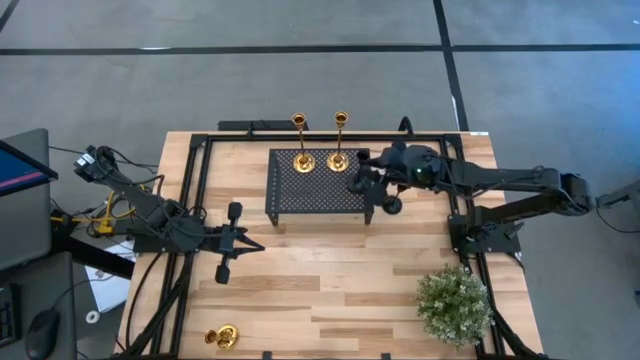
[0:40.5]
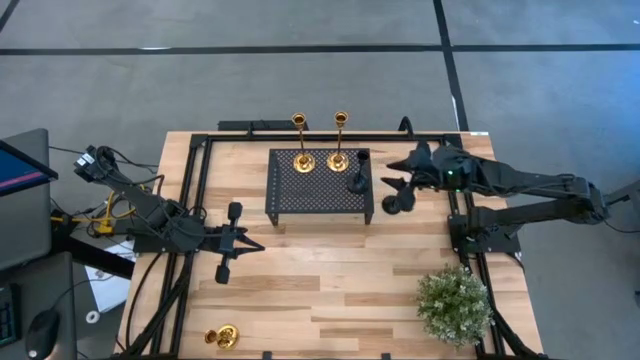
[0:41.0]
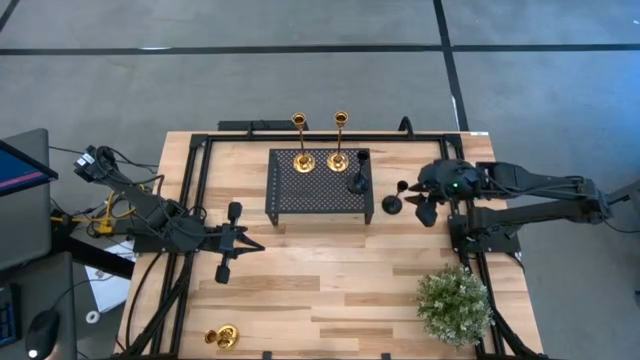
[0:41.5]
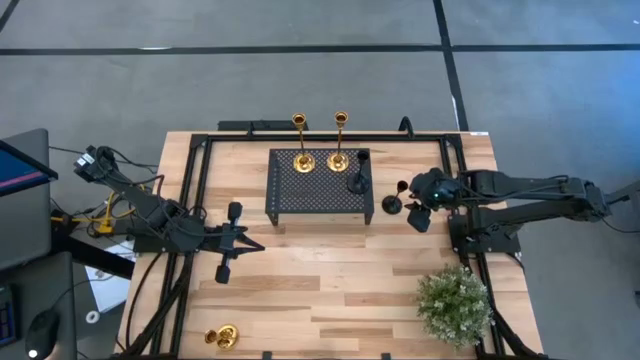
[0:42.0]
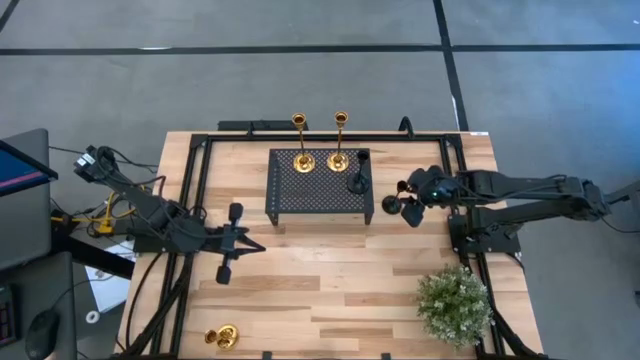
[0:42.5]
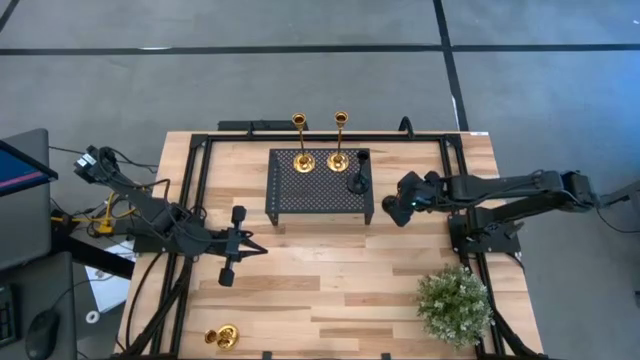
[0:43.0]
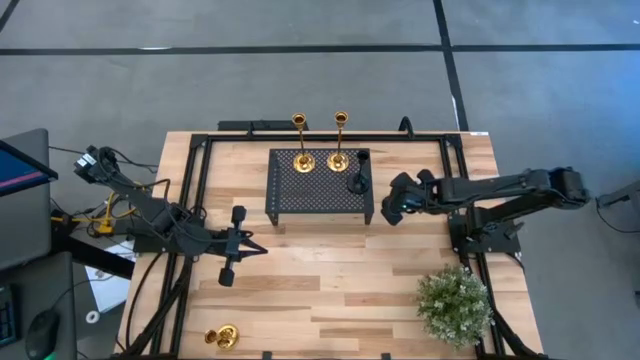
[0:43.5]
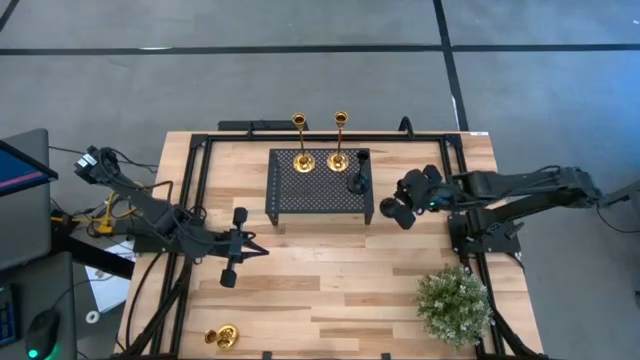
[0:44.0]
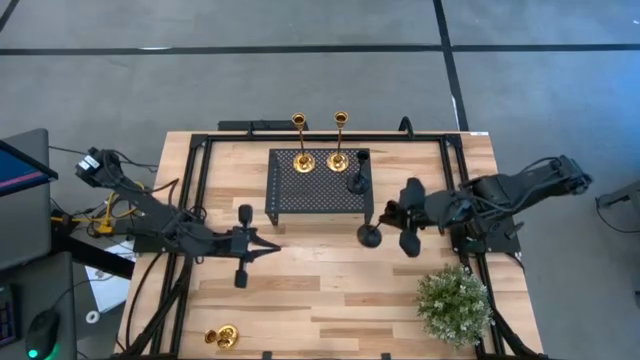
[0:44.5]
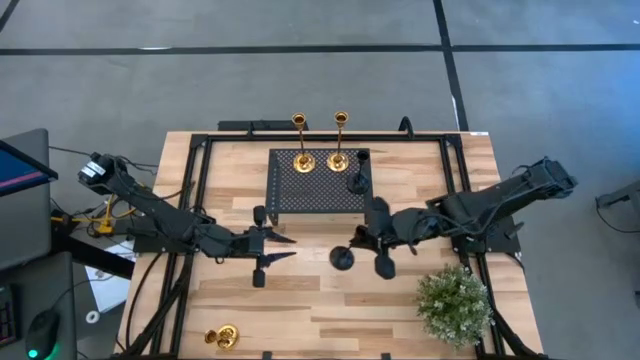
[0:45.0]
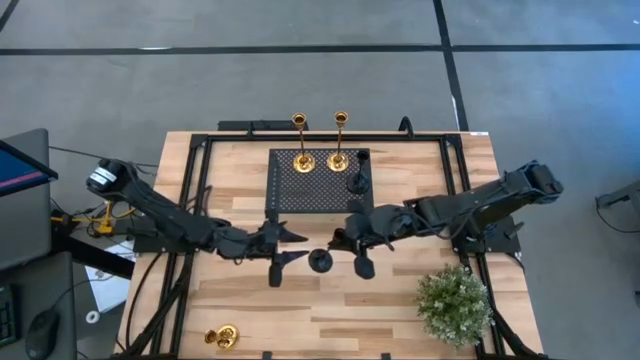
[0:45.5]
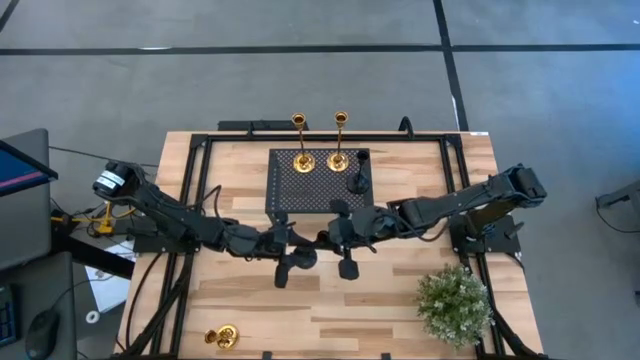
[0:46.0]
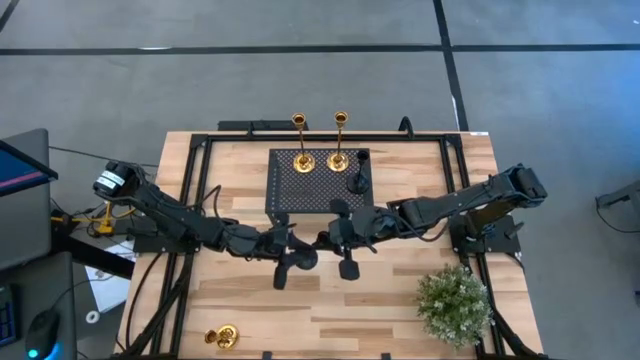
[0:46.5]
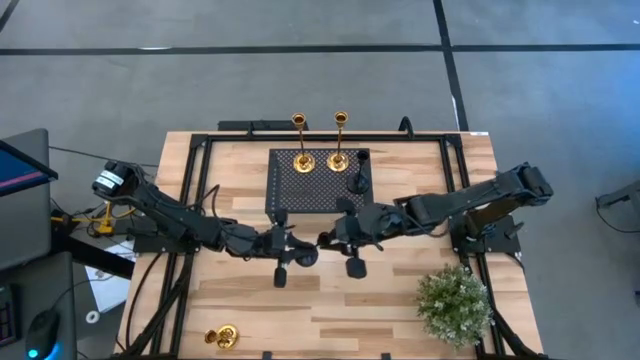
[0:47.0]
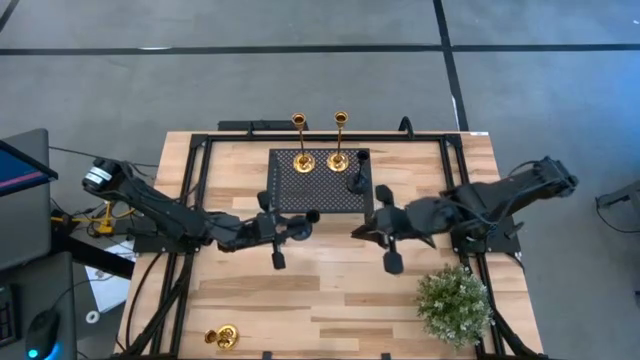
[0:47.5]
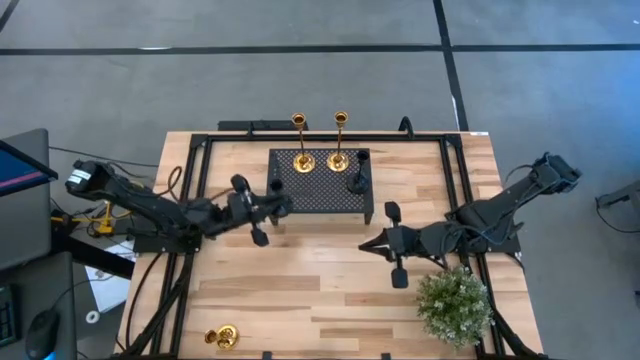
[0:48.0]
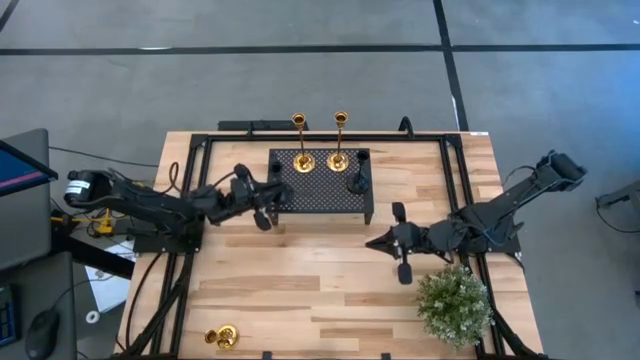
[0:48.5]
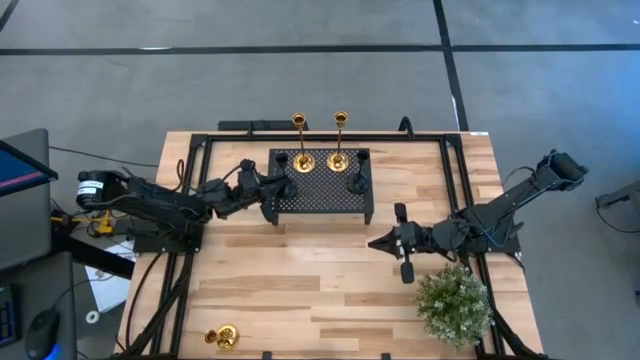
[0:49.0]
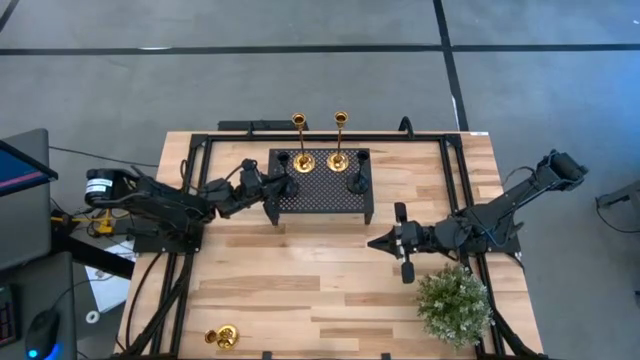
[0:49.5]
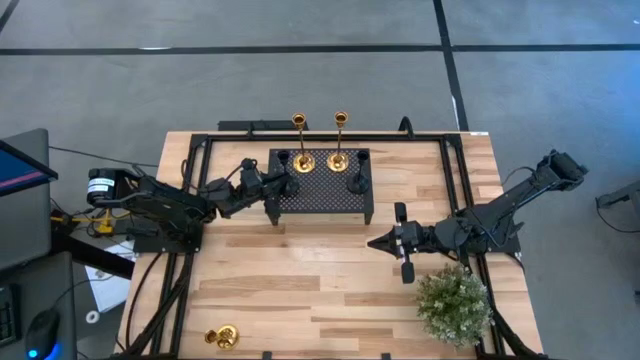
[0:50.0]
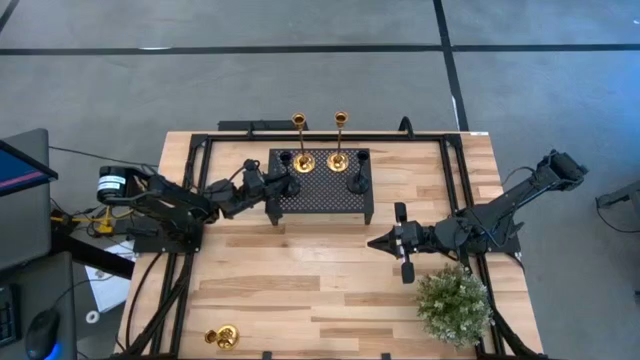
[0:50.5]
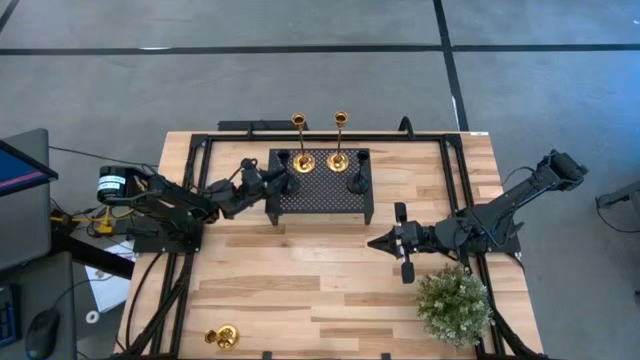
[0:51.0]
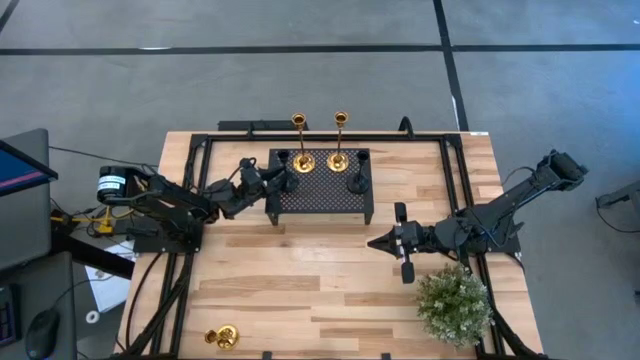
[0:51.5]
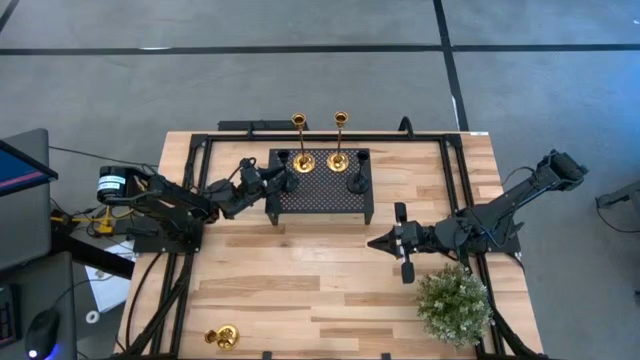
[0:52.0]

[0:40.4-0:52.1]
Task: Pick & Place candle stick holders
Put the black candle holder on the shelf

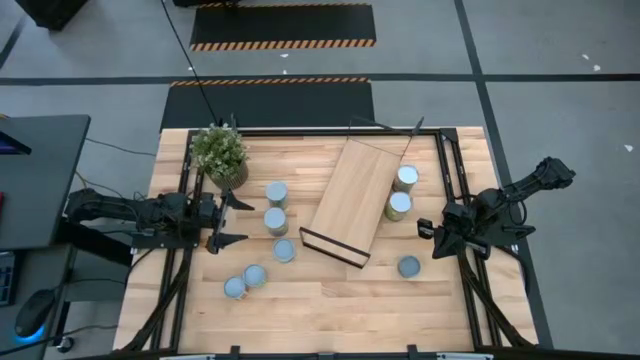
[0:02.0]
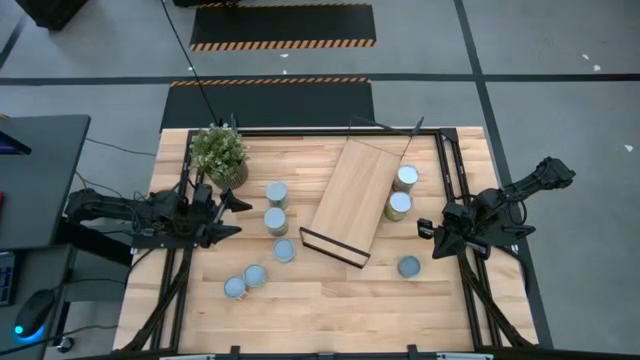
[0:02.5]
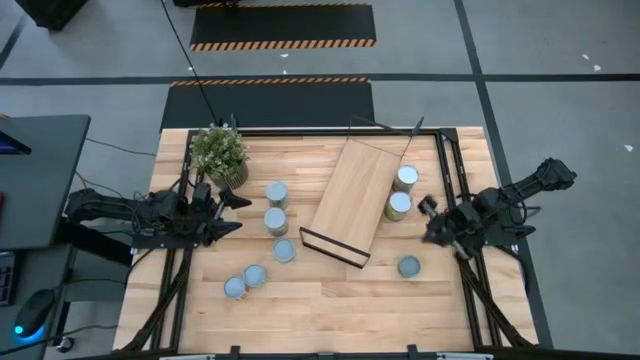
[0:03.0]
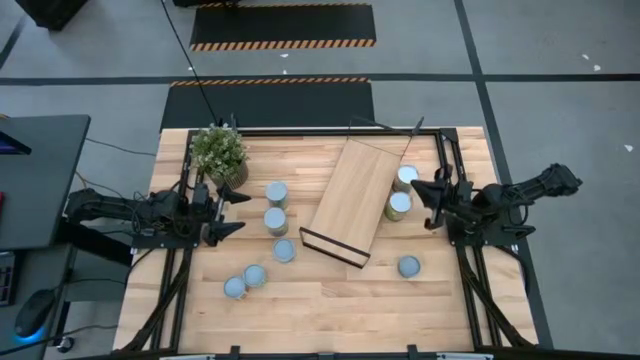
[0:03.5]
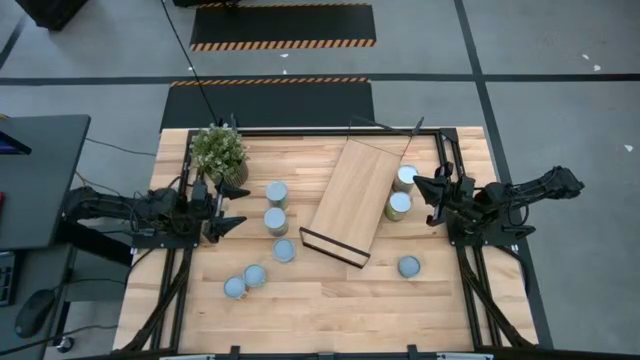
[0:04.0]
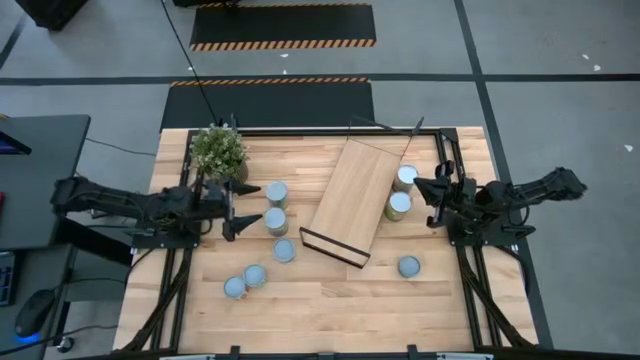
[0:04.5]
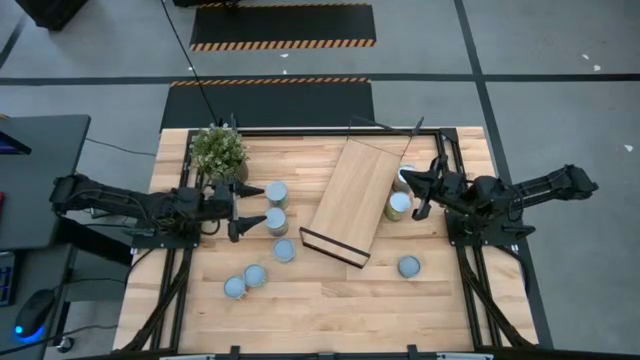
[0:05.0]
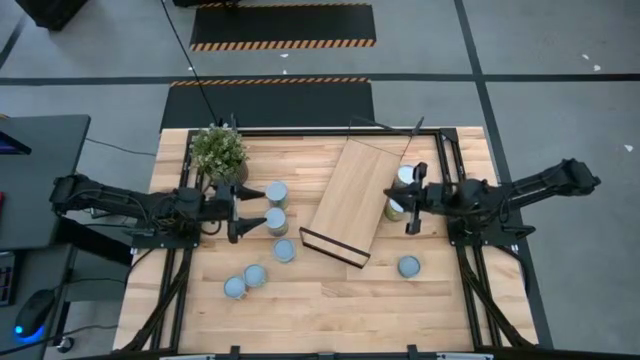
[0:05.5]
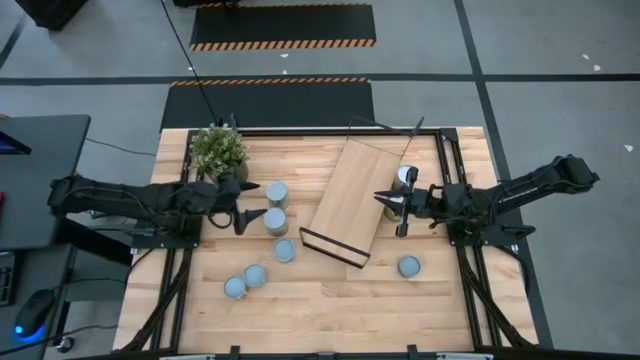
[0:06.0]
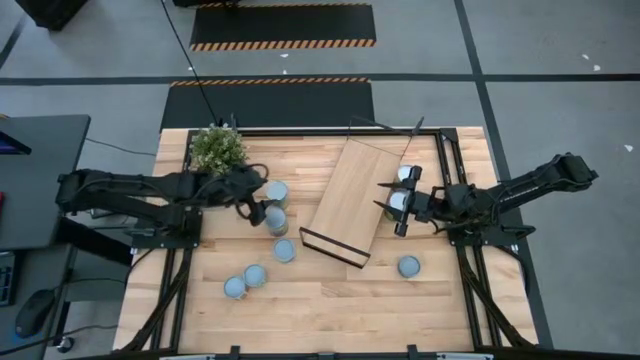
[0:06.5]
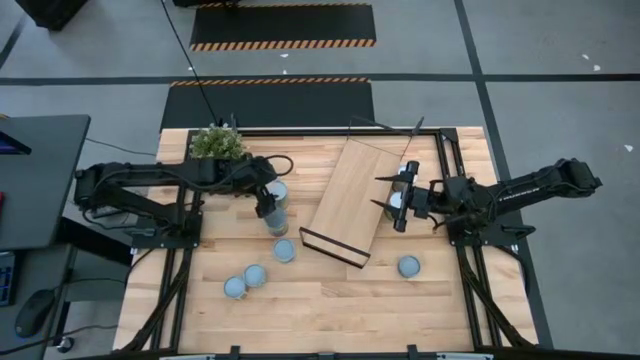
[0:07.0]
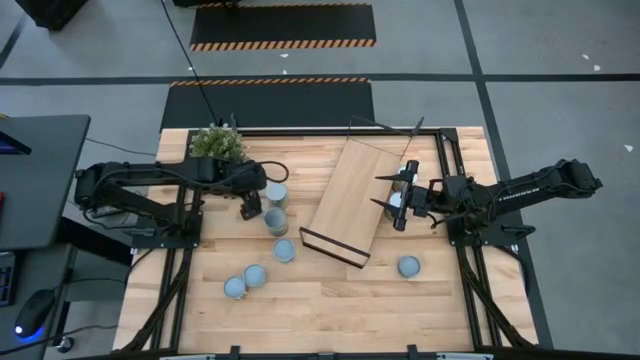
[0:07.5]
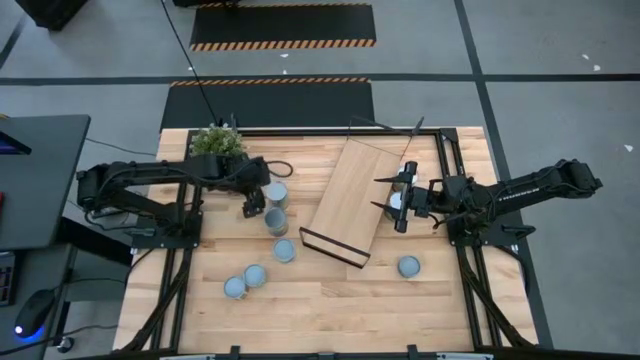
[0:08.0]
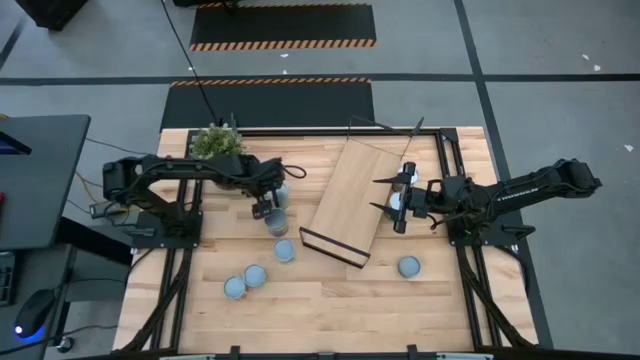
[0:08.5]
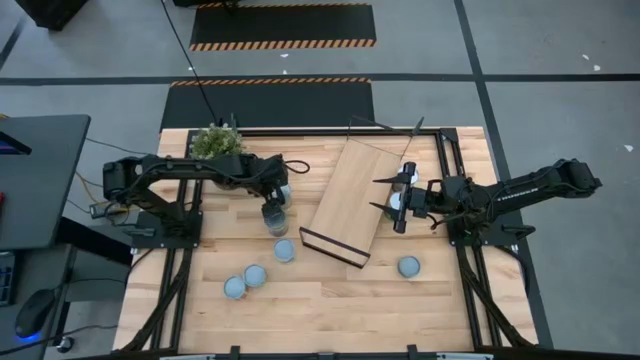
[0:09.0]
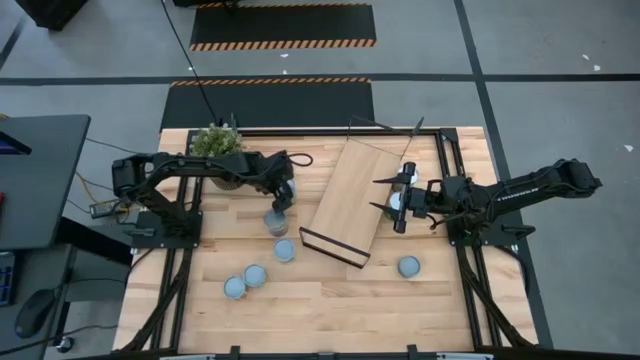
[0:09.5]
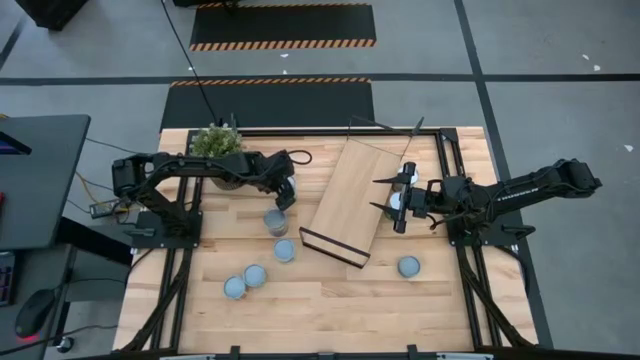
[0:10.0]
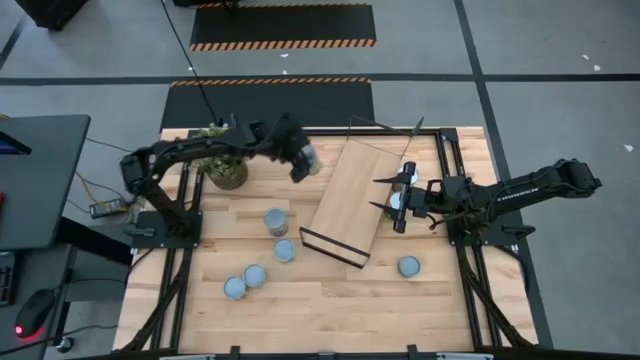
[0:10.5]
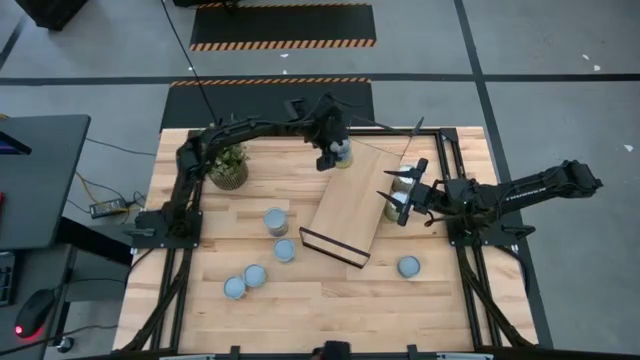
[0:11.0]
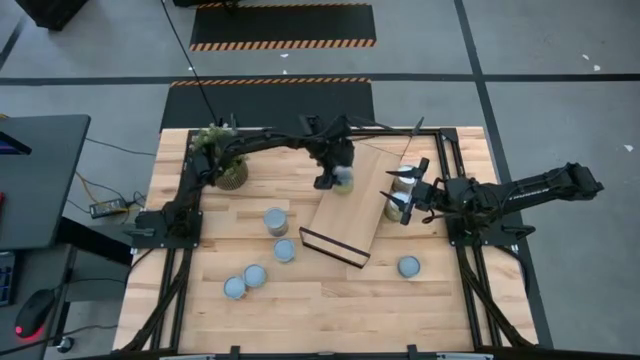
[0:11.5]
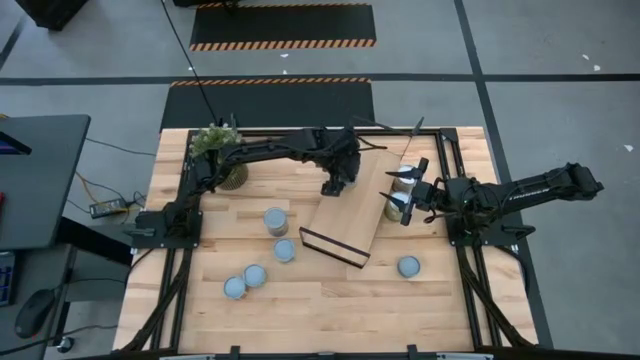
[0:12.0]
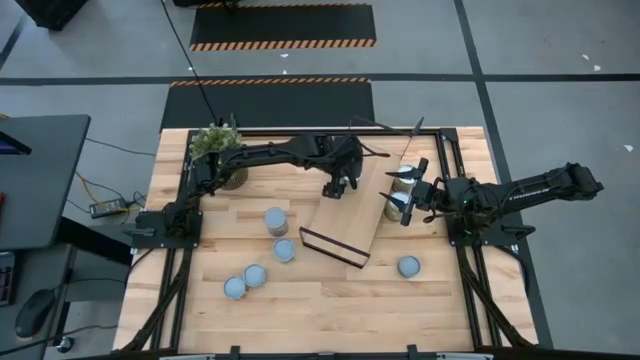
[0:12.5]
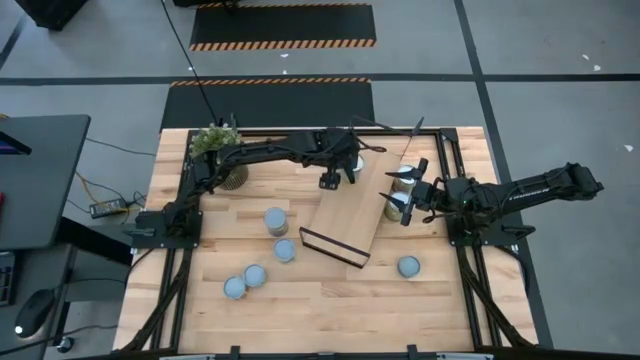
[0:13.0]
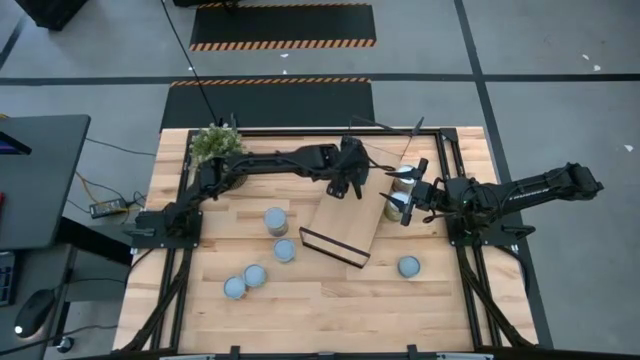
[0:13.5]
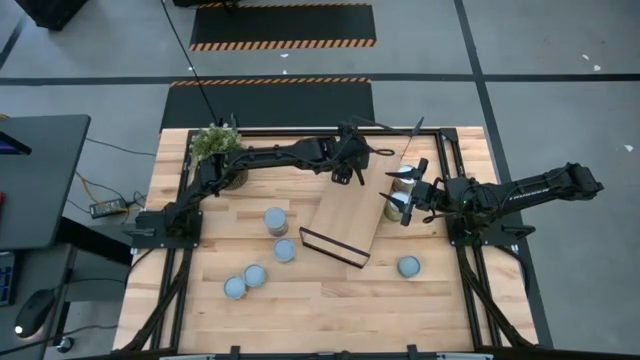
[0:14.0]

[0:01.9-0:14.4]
Task: Pick and place cans onto a shelf
Put the canned carrots on the shelf
